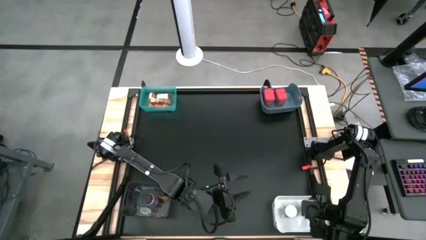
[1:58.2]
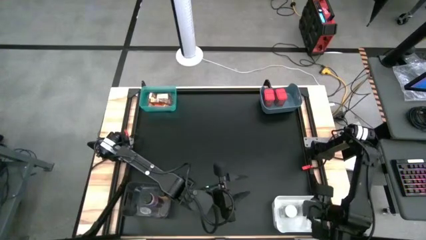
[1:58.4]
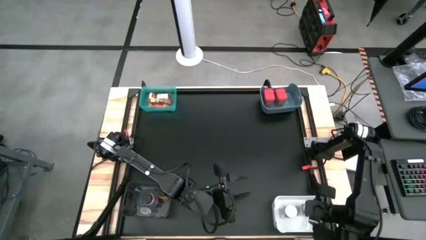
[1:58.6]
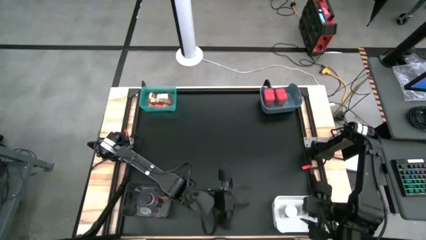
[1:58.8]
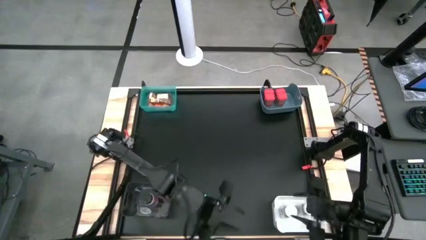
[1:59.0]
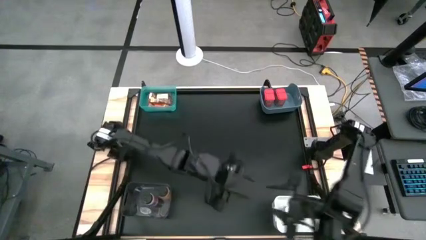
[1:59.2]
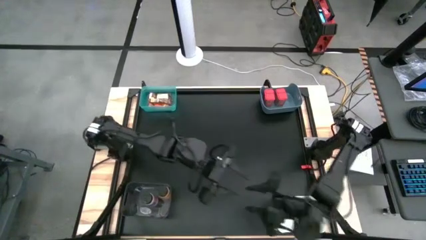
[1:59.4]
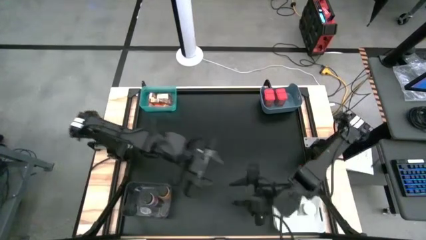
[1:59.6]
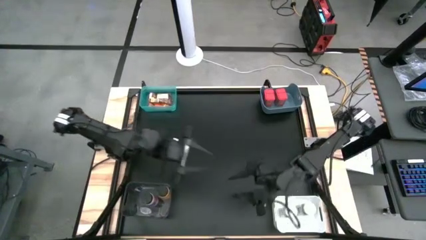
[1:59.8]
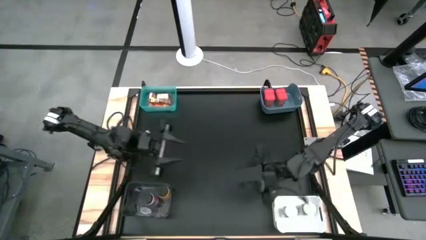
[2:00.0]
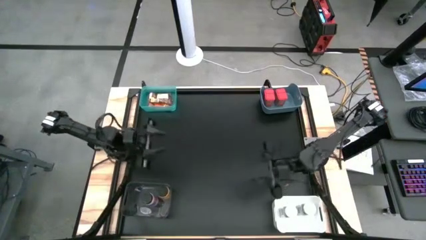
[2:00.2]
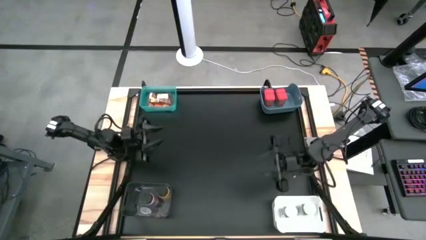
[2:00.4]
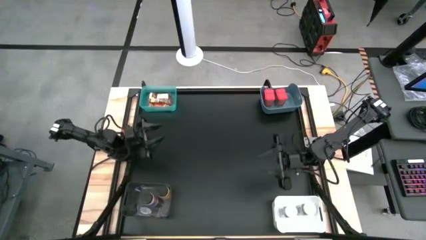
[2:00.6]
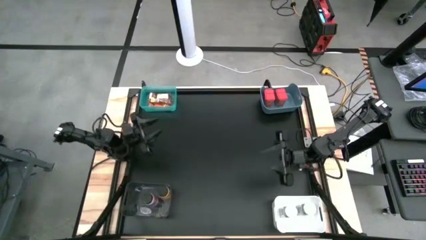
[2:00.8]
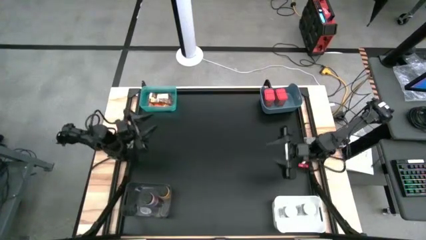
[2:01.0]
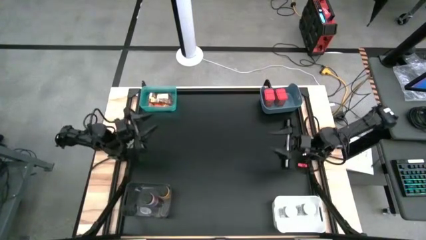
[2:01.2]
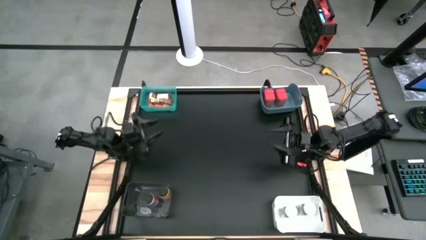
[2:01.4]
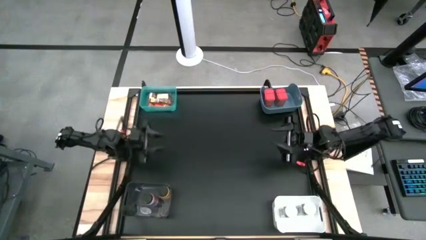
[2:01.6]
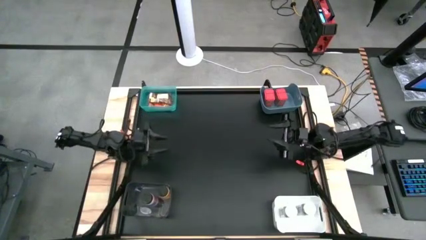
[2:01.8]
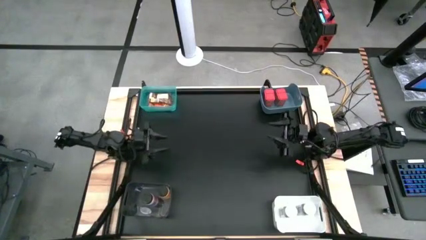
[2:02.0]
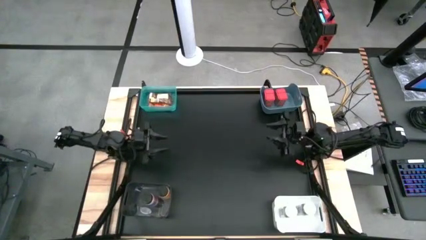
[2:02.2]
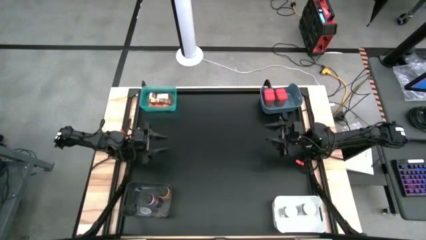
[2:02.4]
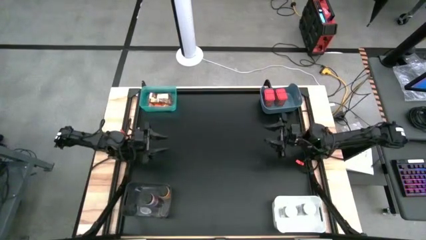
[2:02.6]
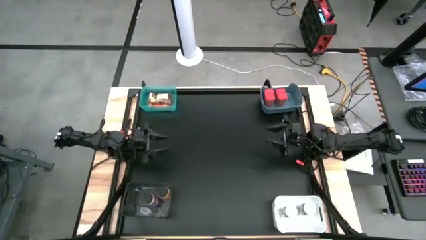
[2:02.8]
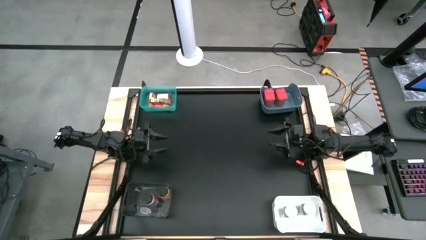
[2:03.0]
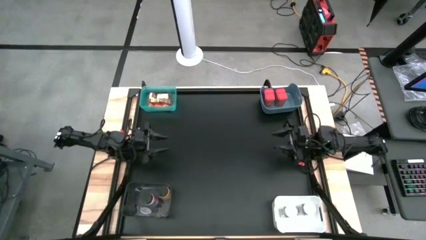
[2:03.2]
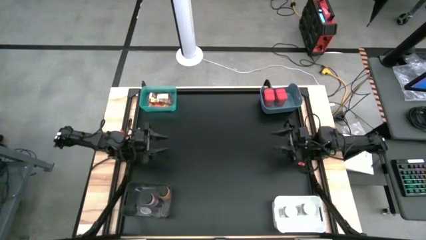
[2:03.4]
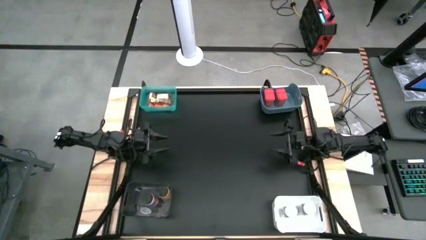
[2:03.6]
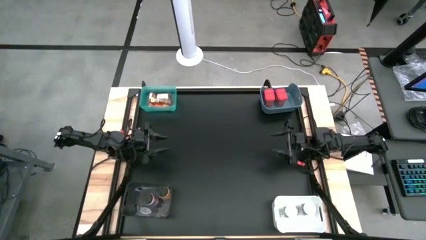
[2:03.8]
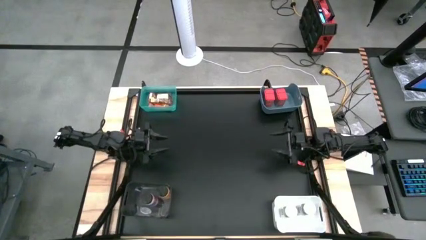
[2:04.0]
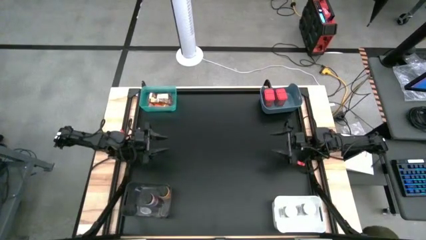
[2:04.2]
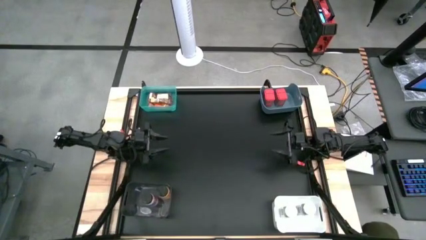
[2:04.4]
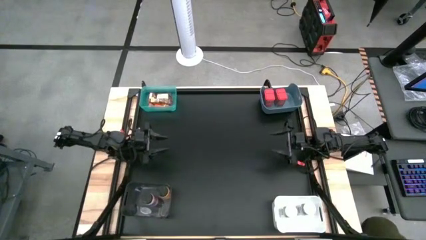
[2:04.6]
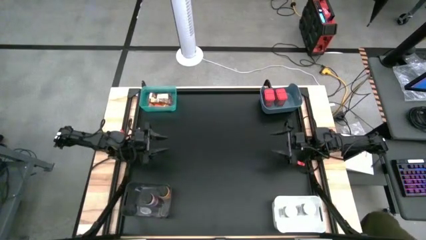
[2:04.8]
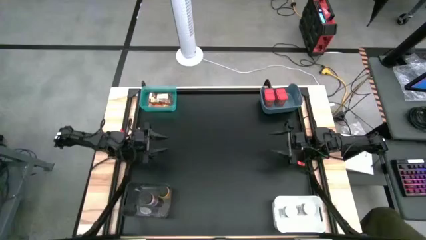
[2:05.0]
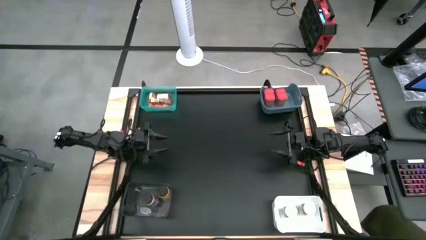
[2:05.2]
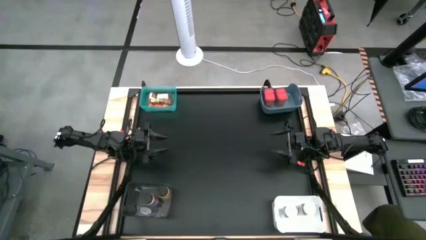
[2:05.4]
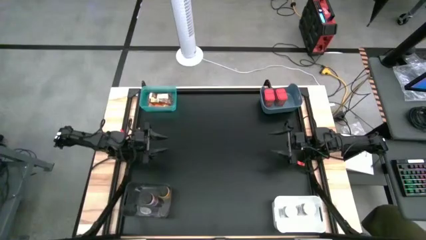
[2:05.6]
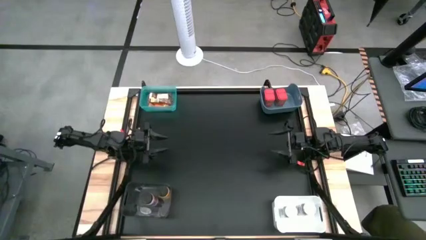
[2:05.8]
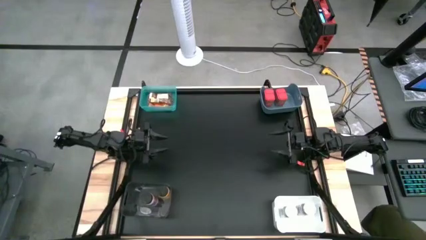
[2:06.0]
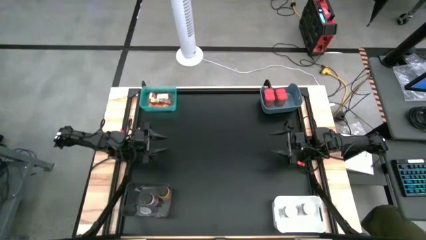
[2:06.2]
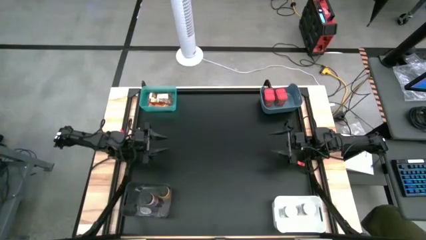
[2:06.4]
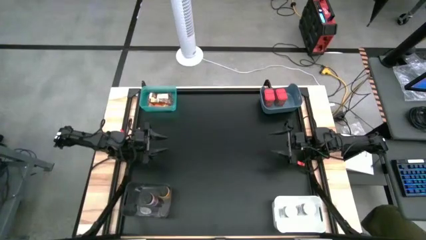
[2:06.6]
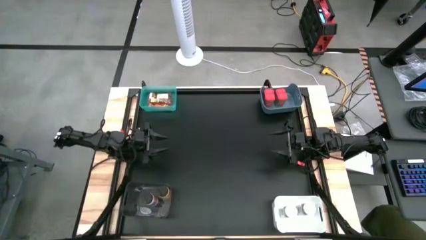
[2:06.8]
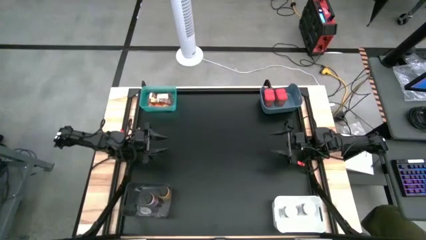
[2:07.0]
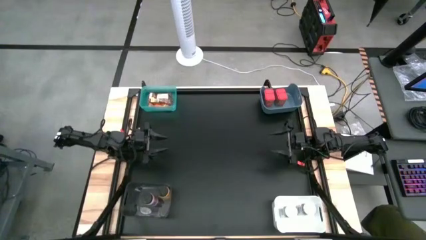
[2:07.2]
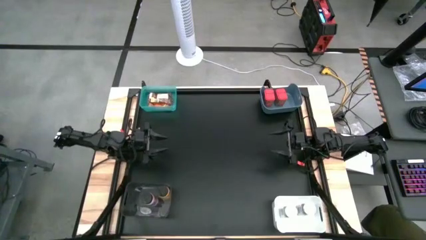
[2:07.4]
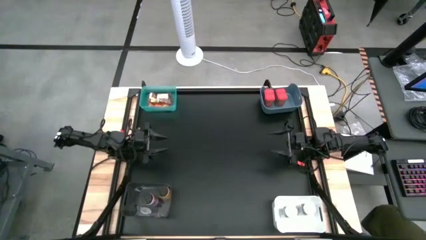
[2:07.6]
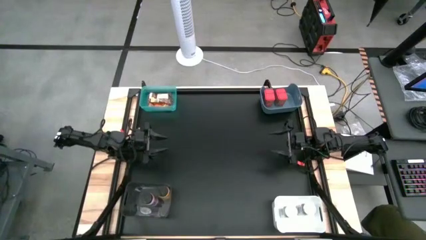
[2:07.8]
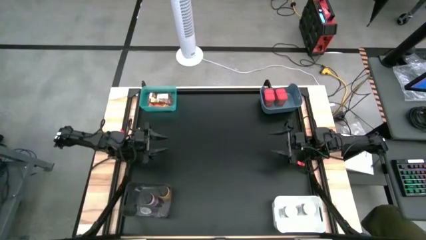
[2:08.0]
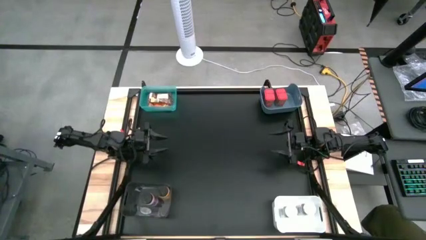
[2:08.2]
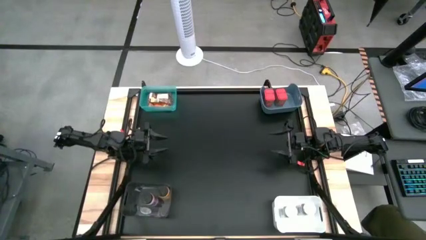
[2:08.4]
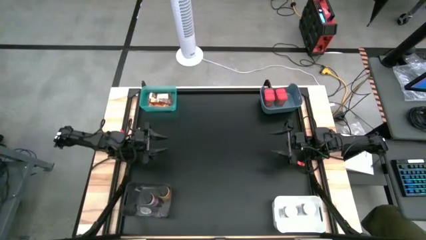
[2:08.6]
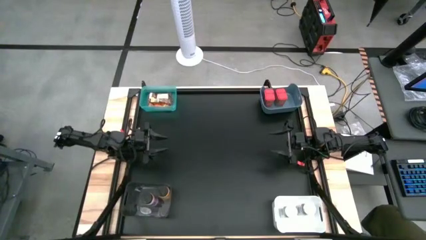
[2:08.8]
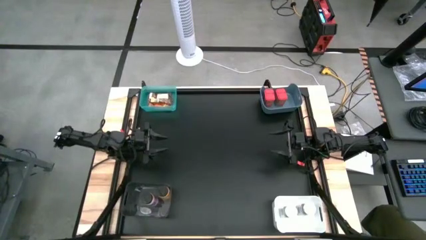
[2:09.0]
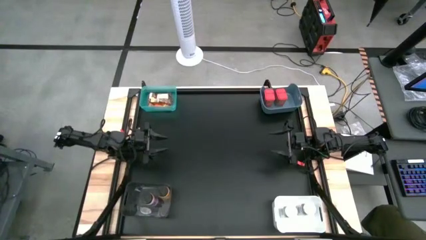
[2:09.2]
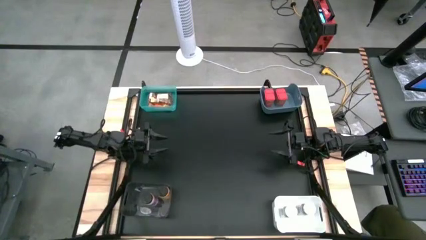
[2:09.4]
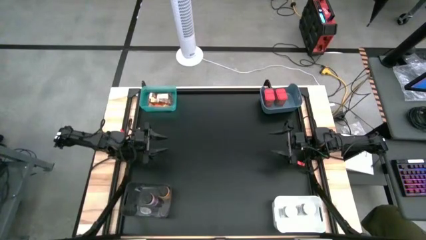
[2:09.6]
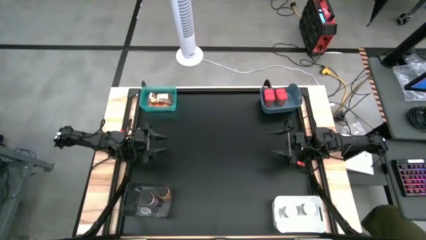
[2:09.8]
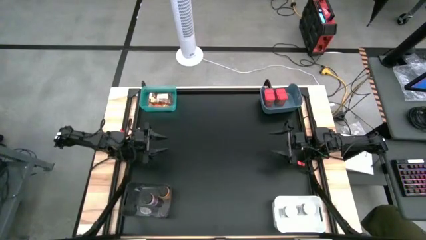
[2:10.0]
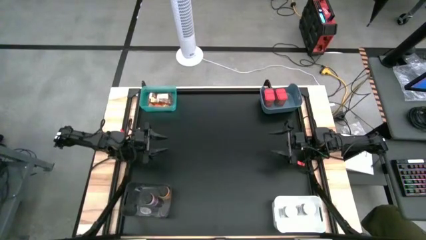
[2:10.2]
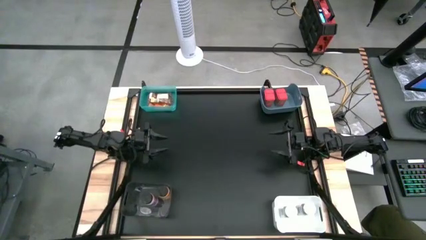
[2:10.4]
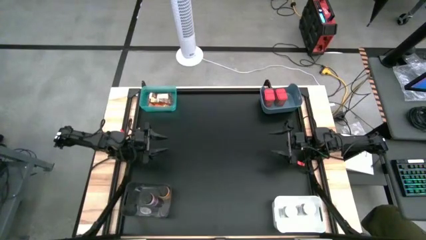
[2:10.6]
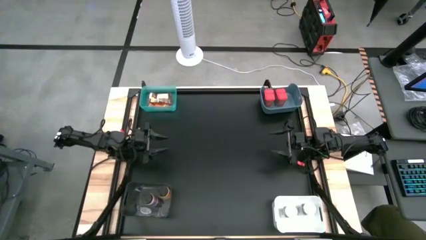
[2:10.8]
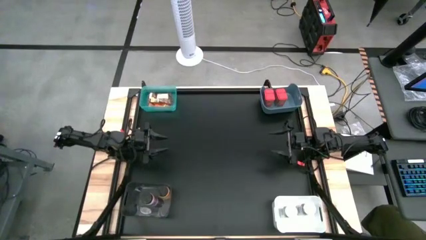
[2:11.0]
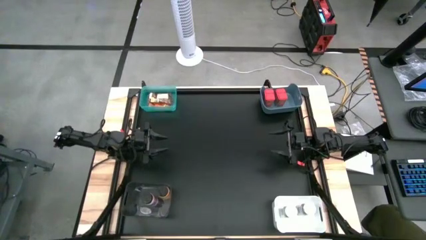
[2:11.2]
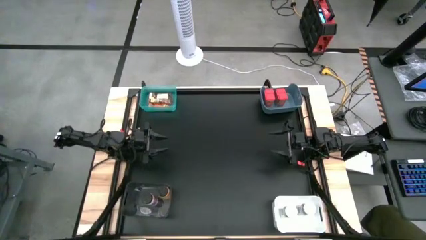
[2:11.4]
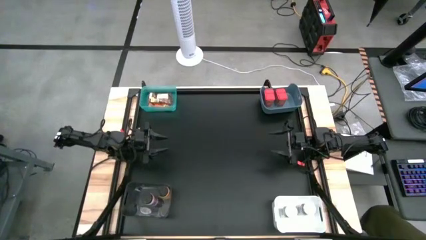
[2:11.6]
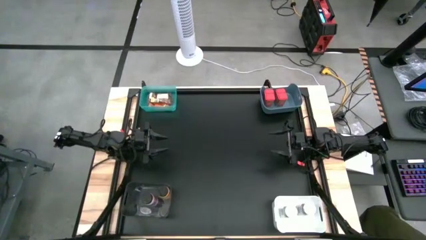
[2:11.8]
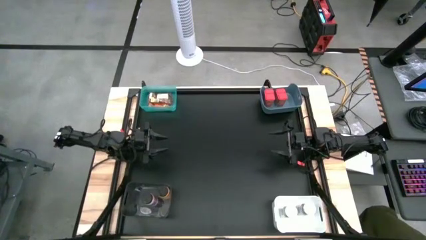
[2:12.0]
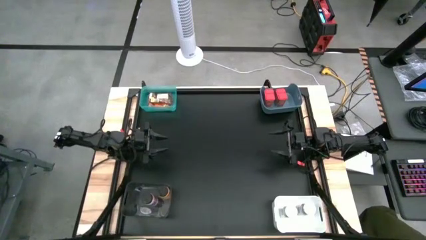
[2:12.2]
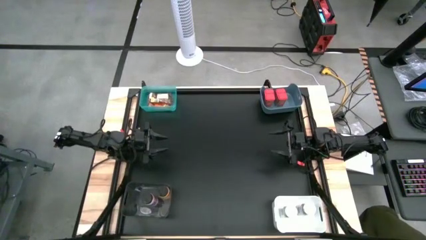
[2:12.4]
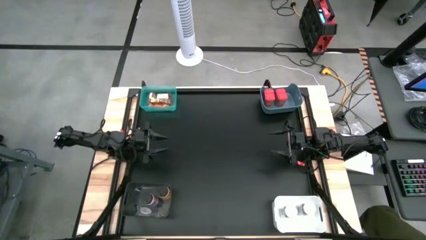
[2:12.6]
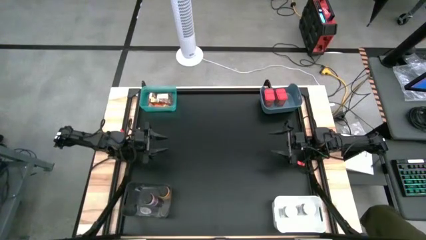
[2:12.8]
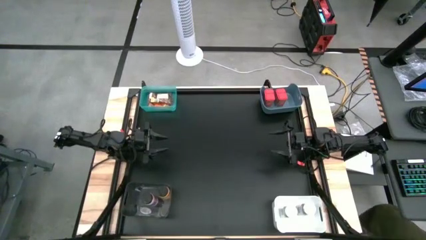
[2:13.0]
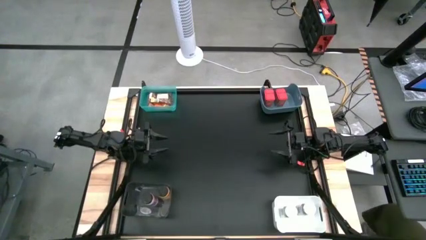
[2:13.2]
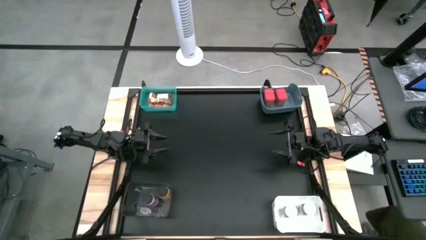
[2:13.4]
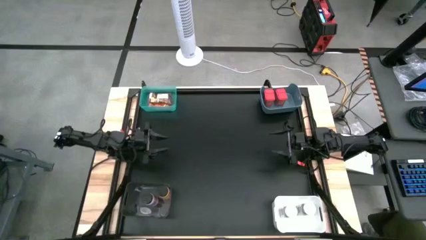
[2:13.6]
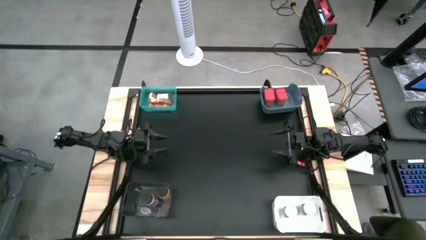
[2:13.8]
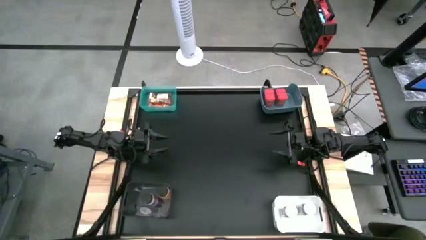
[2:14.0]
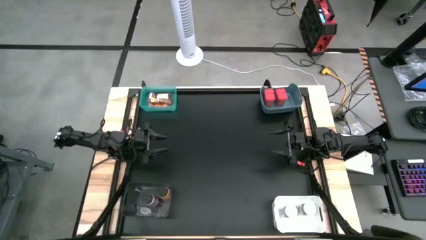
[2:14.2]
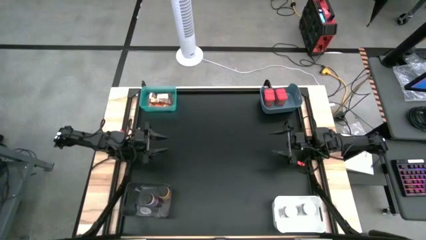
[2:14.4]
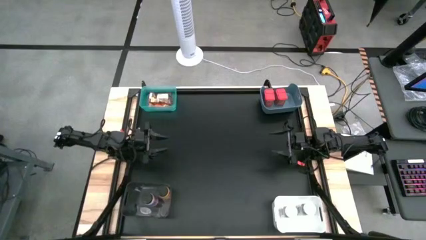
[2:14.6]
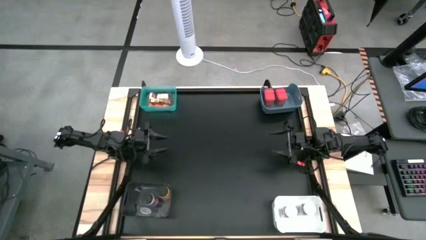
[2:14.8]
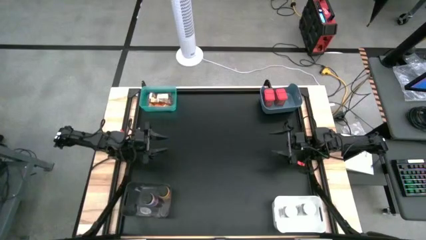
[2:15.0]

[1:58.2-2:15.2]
Task: Sort spices by type
Return to Home Position
